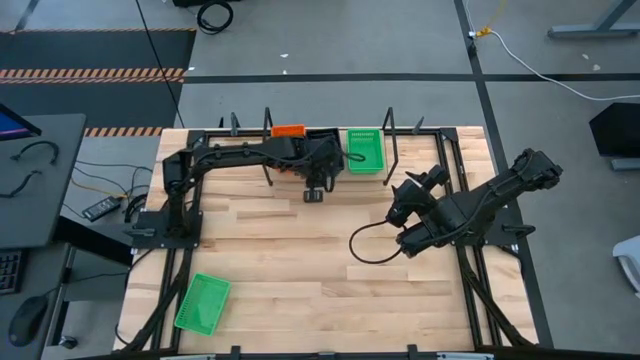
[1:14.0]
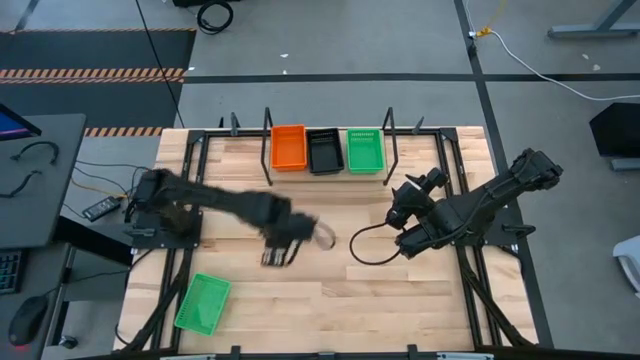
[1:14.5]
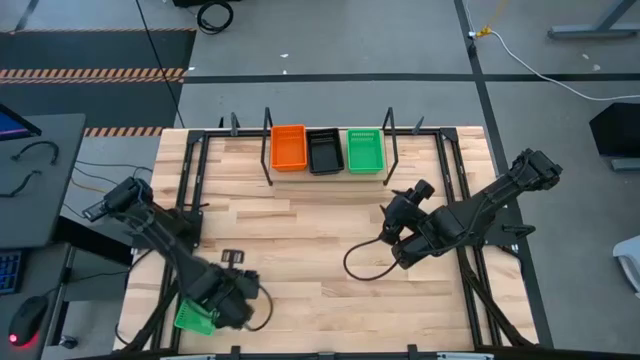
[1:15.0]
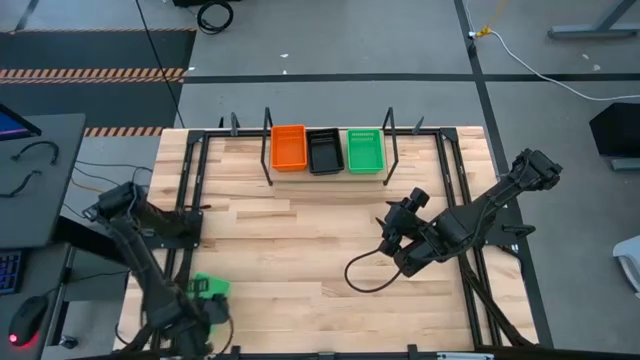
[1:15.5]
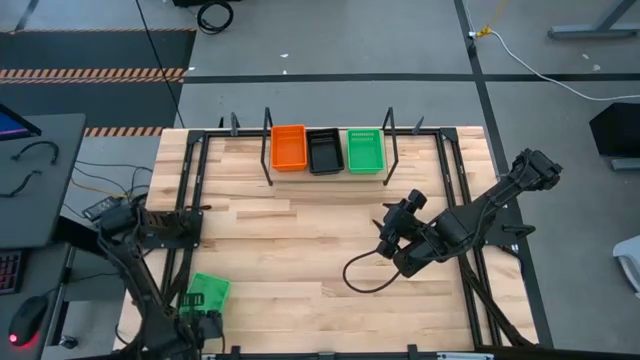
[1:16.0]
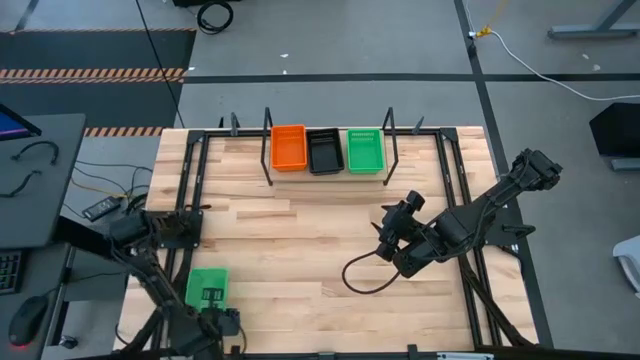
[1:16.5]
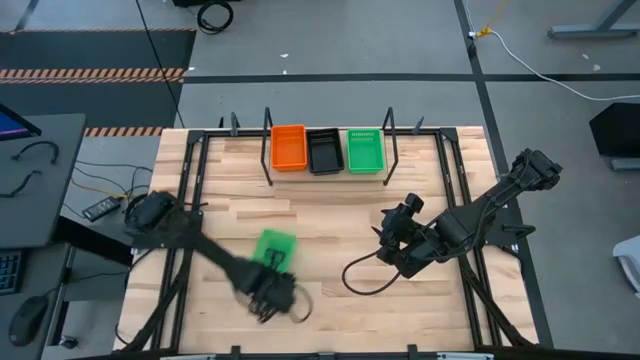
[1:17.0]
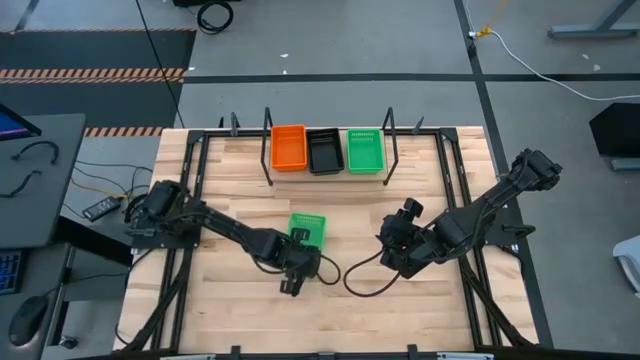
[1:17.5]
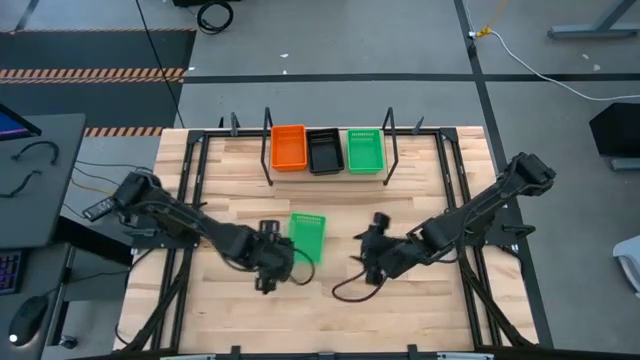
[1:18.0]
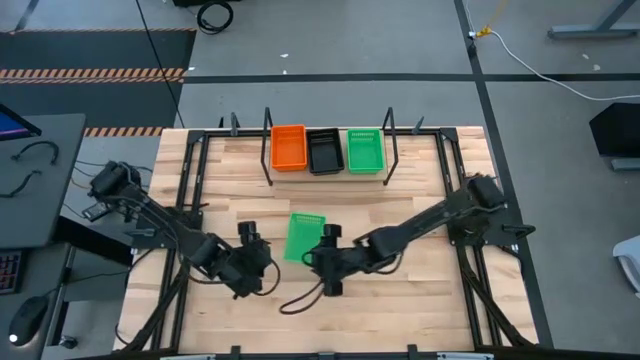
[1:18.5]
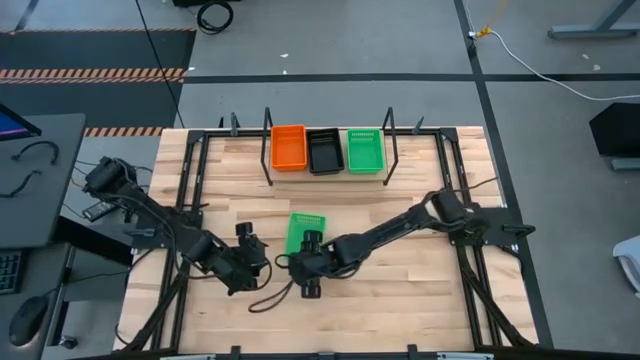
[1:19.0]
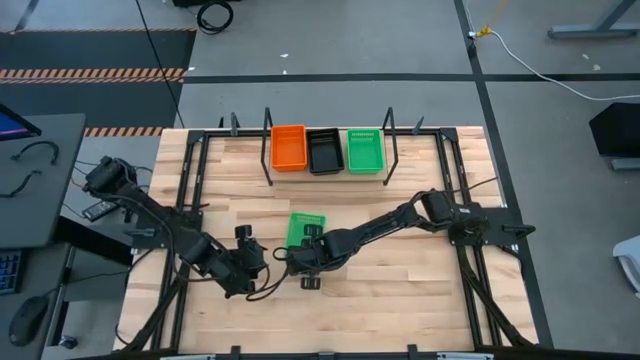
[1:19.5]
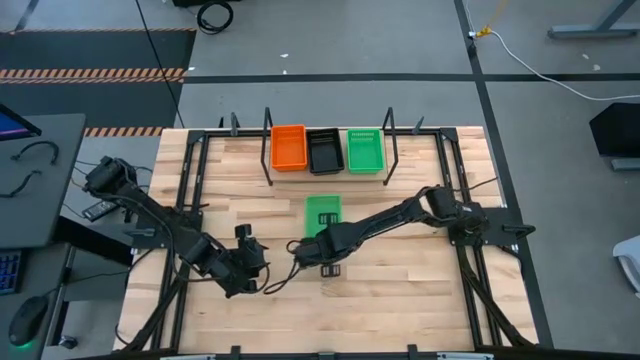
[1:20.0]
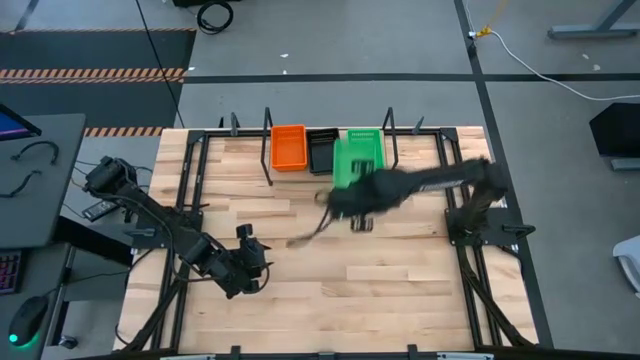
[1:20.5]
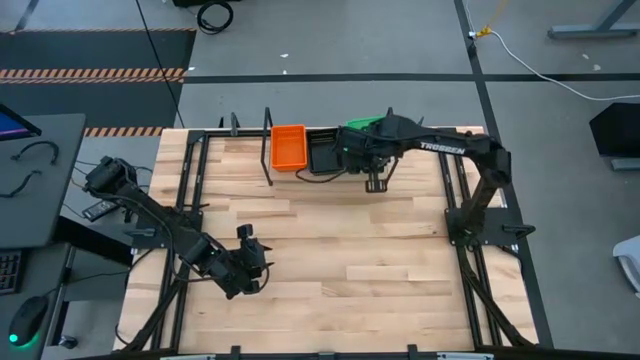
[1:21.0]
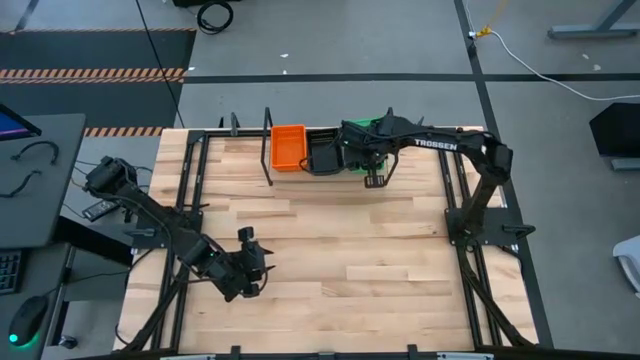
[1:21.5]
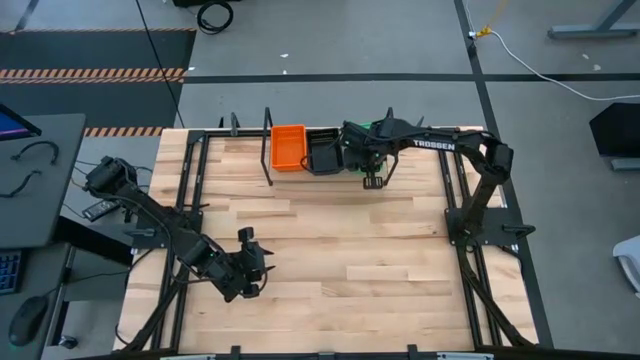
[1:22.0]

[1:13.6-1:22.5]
Task: Stack baskets on shelf by color
Stack the green bin on top of the other green bins on the shelf

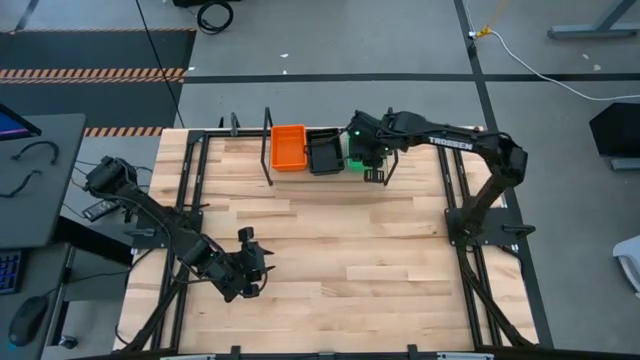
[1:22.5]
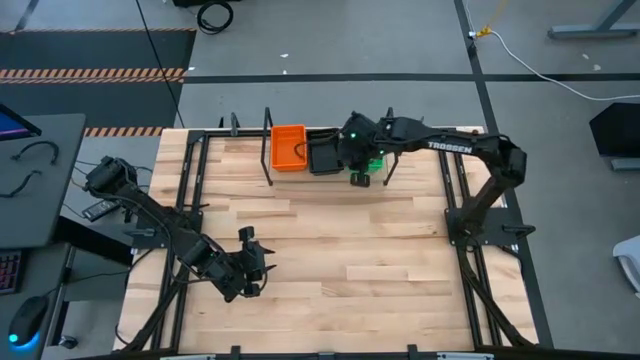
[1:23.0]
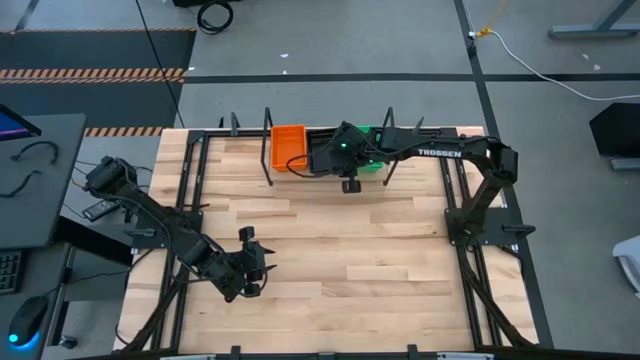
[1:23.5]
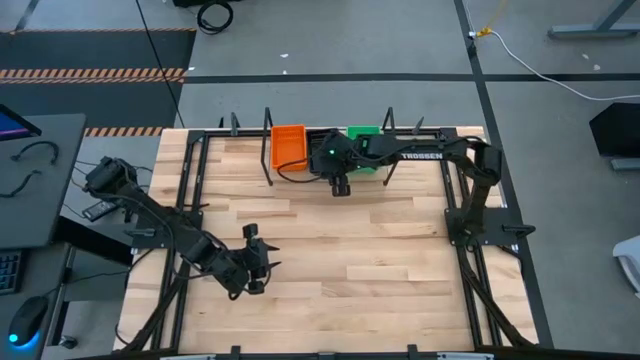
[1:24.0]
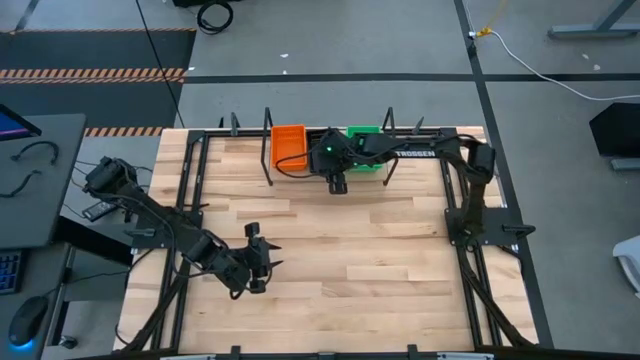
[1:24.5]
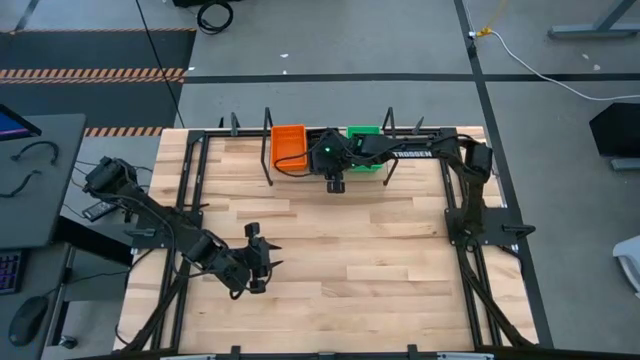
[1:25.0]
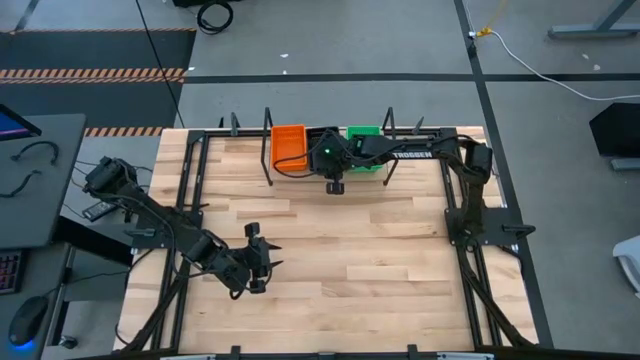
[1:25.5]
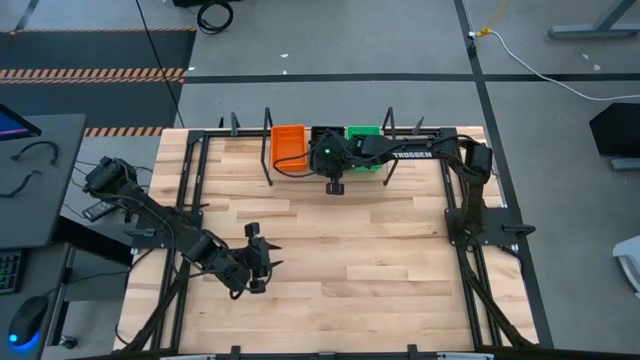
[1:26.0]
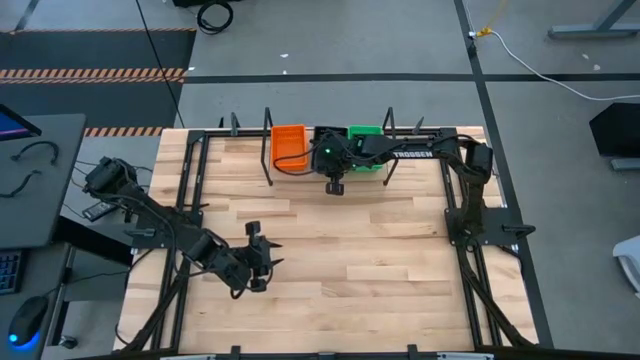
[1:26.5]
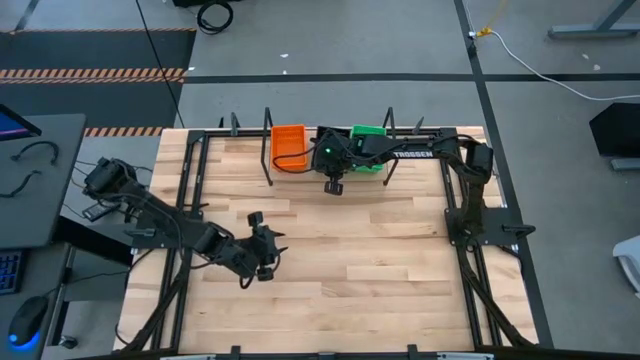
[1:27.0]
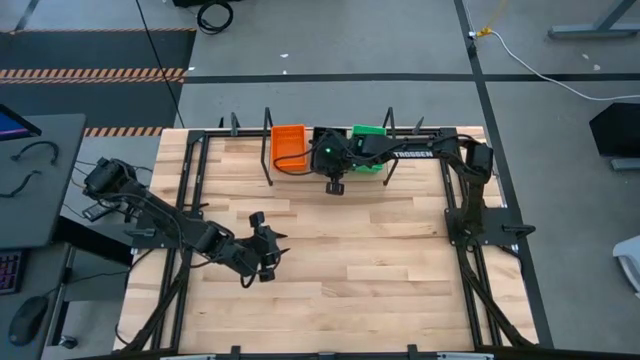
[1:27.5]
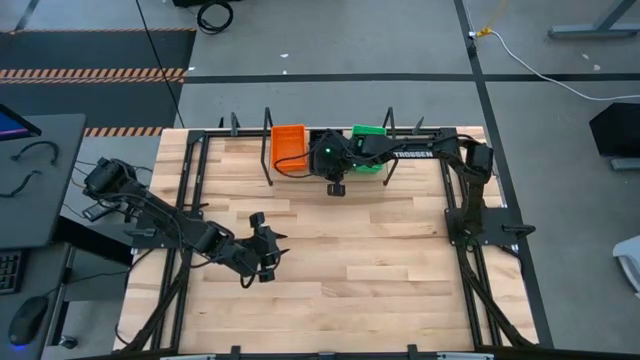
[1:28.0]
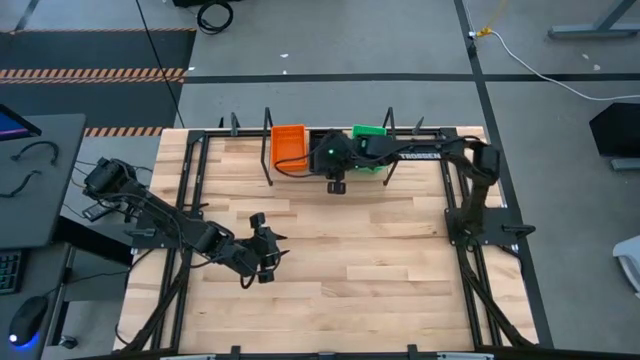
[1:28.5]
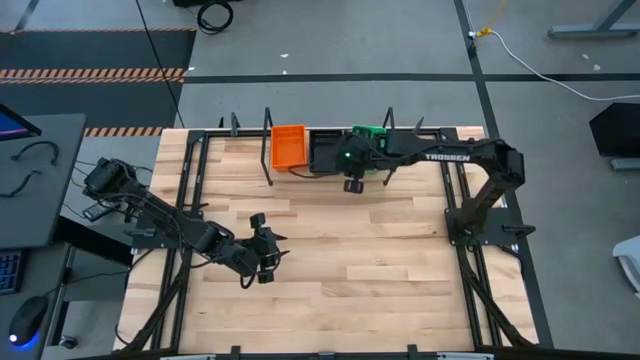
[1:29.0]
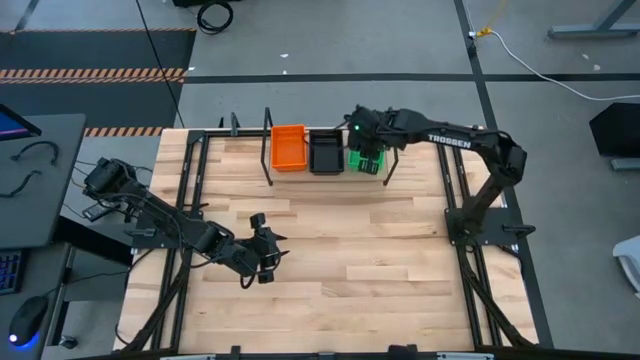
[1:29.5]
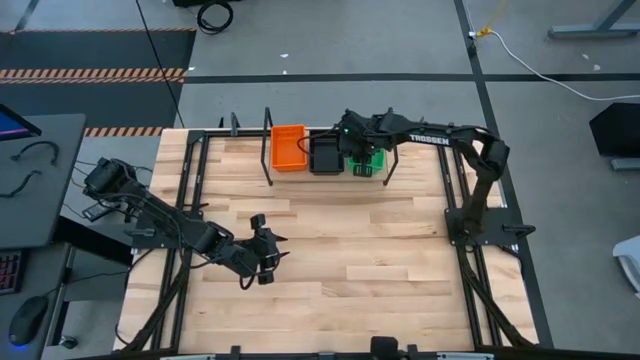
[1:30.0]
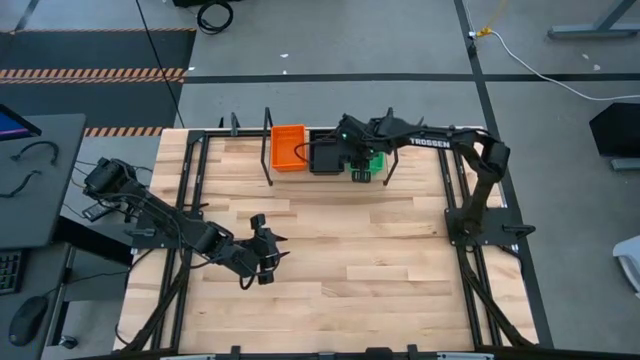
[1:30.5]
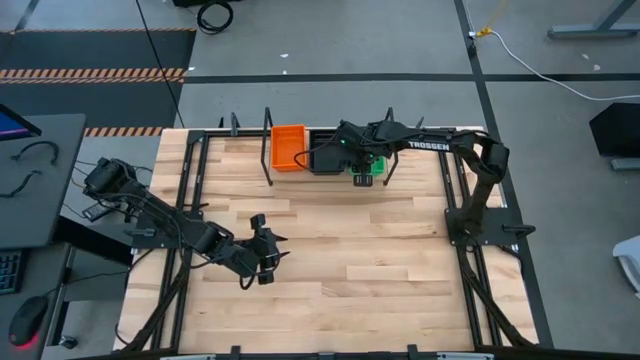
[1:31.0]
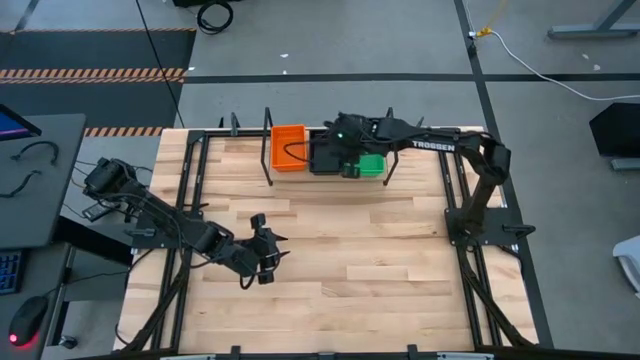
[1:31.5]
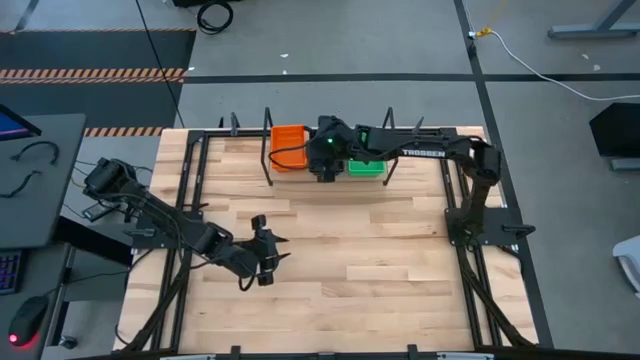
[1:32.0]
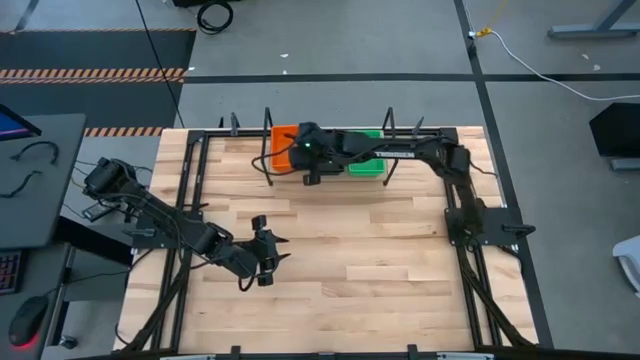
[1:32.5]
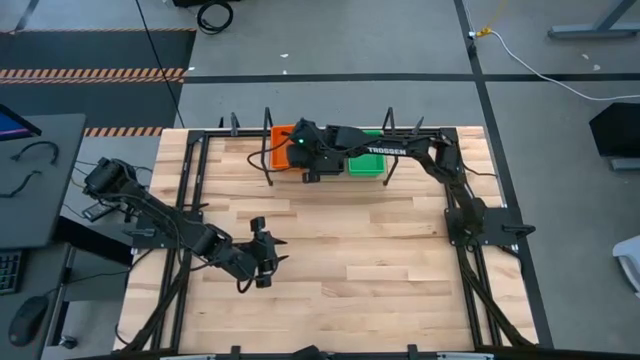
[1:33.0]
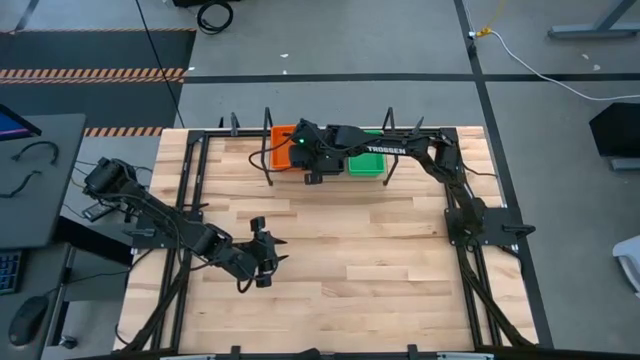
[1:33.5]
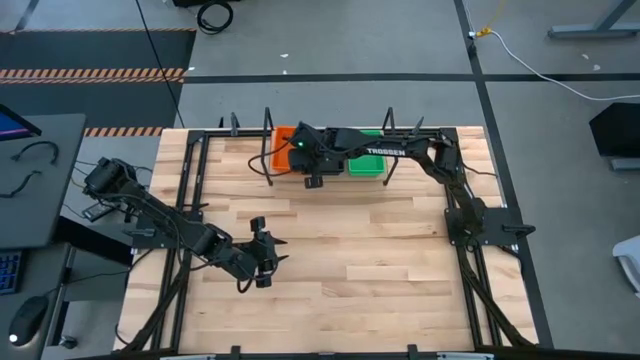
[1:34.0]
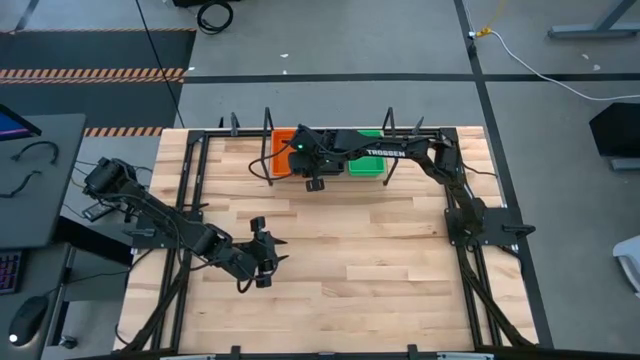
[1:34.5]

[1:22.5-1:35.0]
Adjust the stacked bins on the shelf

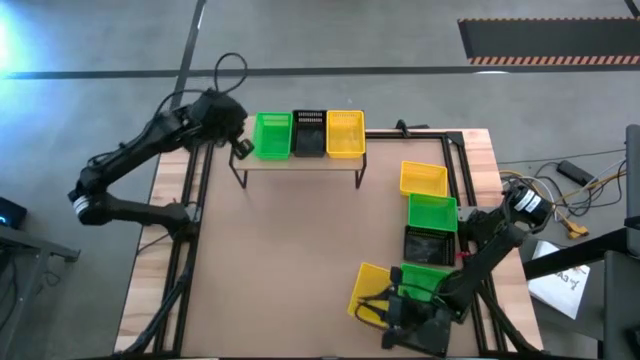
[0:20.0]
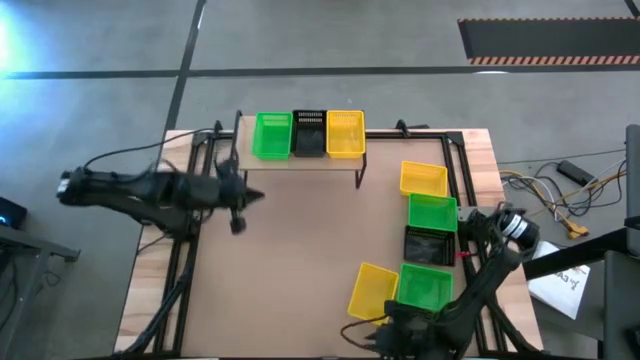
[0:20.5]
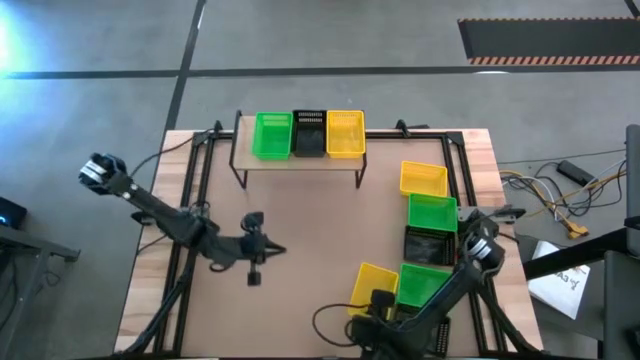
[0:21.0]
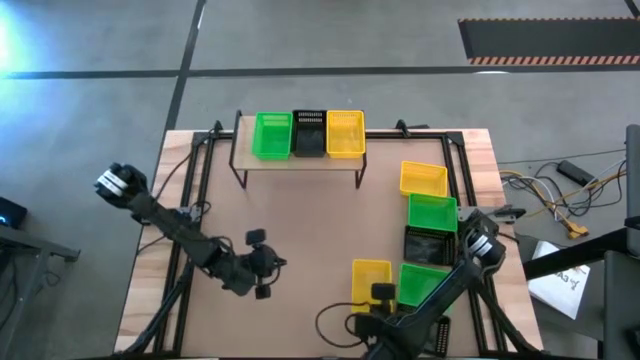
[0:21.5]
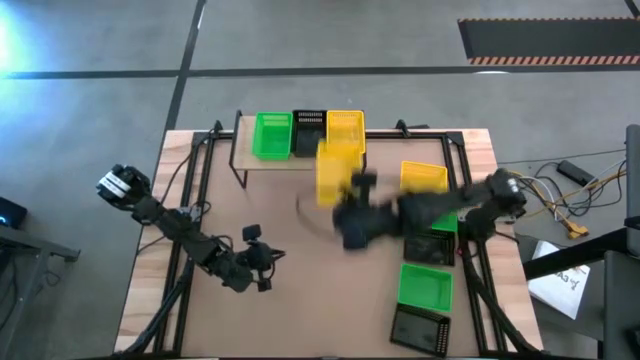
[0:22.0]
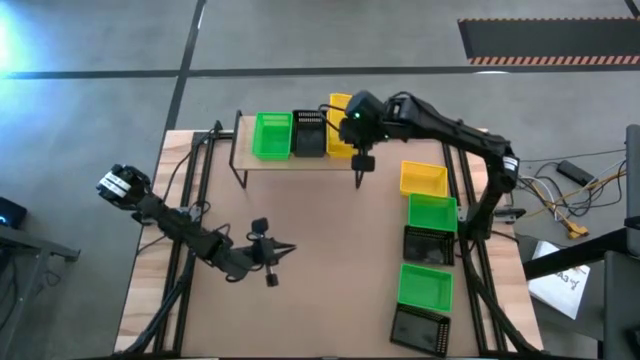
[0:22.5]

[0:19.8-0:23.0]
Task: Stack baskets on shelf by color
Stack the bottom yellow bin on the yellow bin on the shelf
